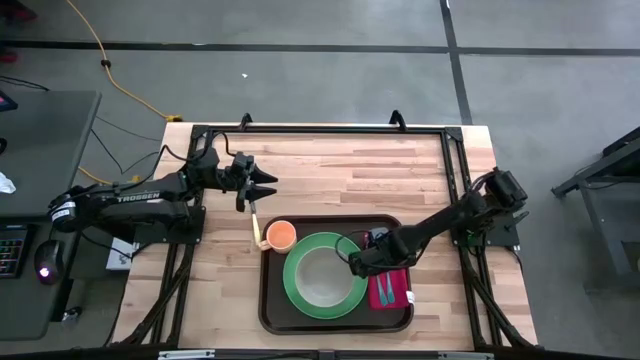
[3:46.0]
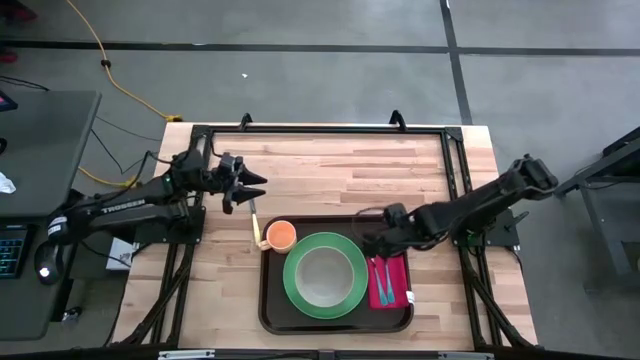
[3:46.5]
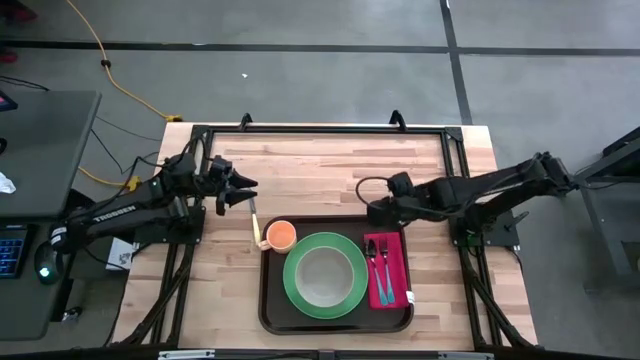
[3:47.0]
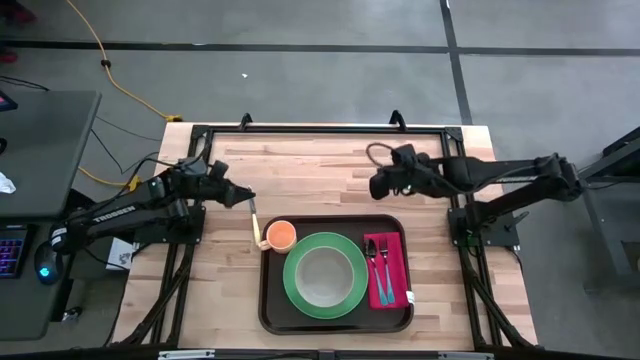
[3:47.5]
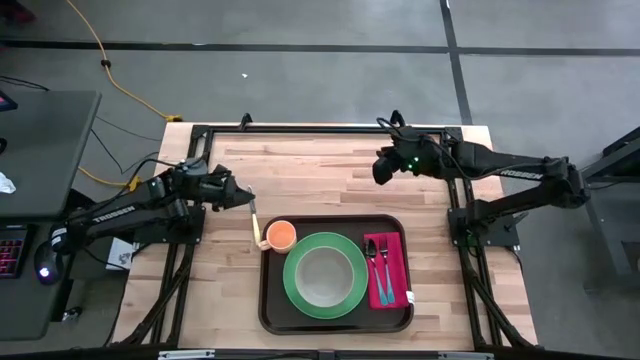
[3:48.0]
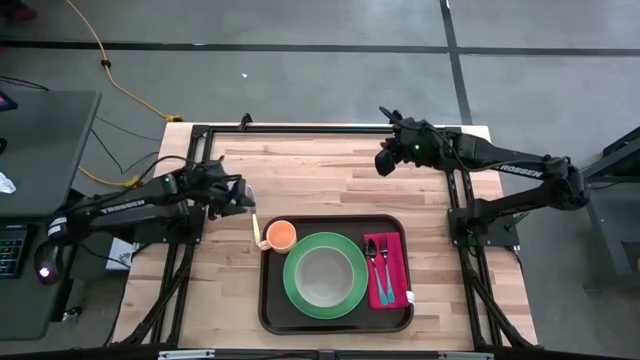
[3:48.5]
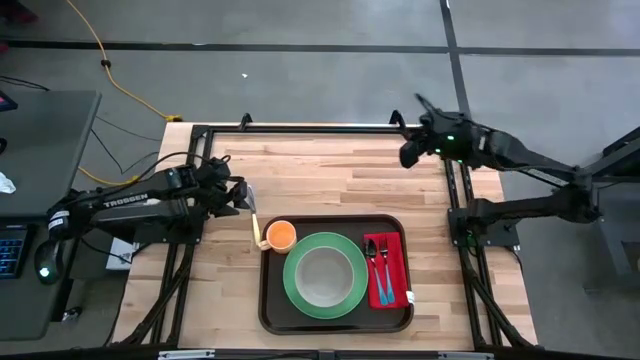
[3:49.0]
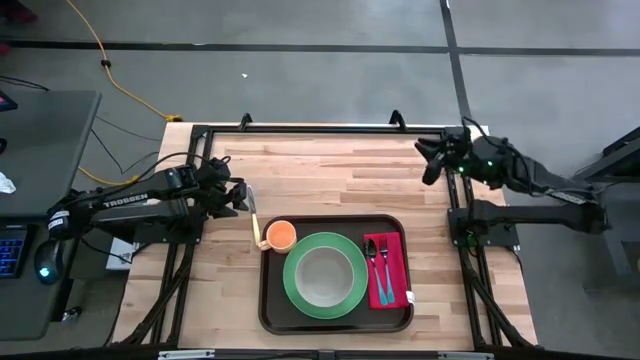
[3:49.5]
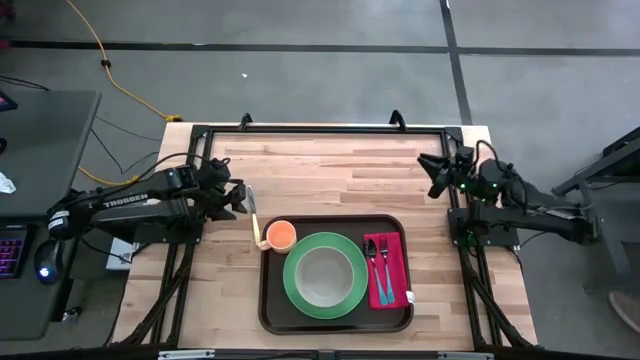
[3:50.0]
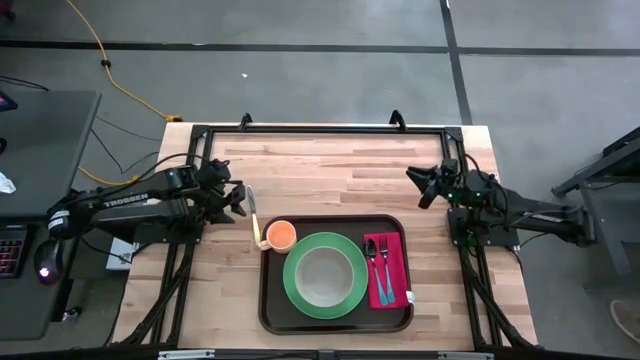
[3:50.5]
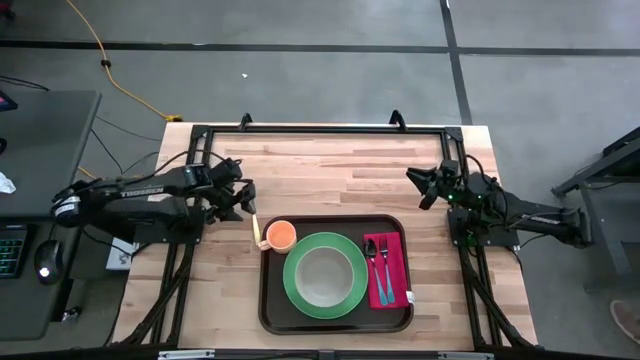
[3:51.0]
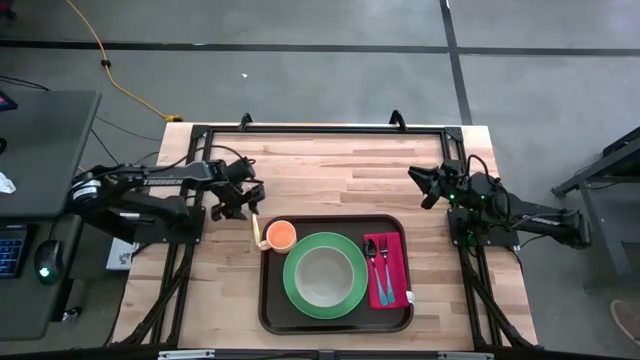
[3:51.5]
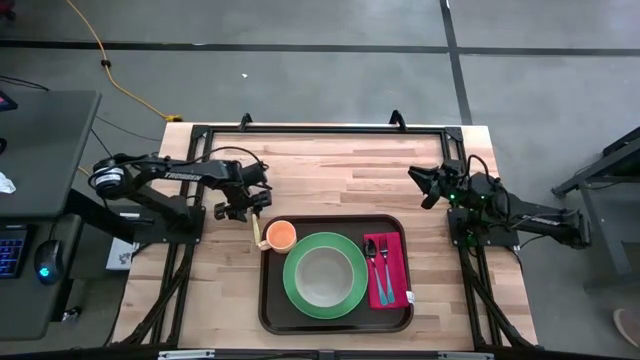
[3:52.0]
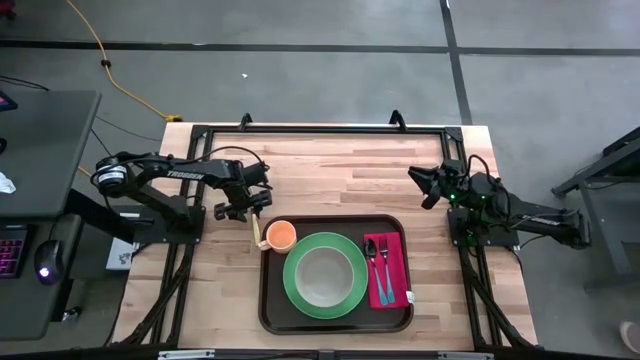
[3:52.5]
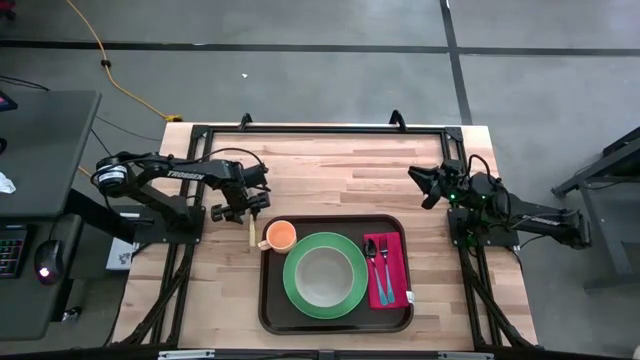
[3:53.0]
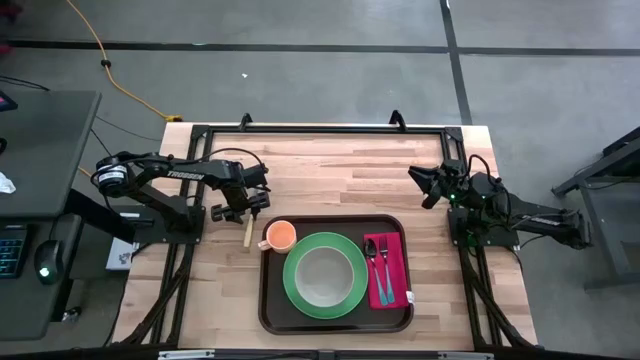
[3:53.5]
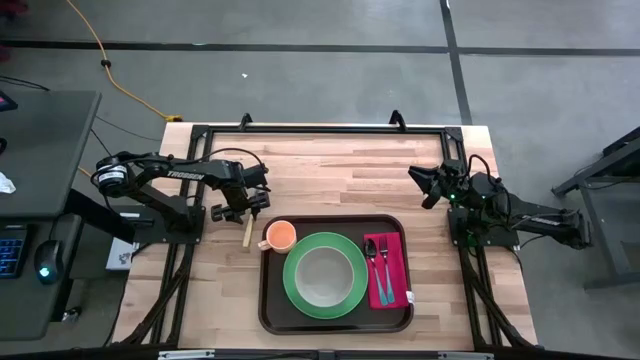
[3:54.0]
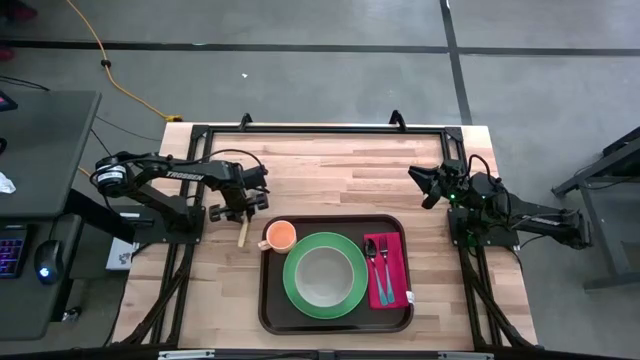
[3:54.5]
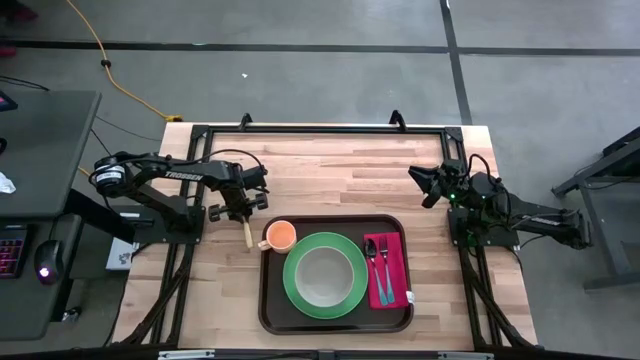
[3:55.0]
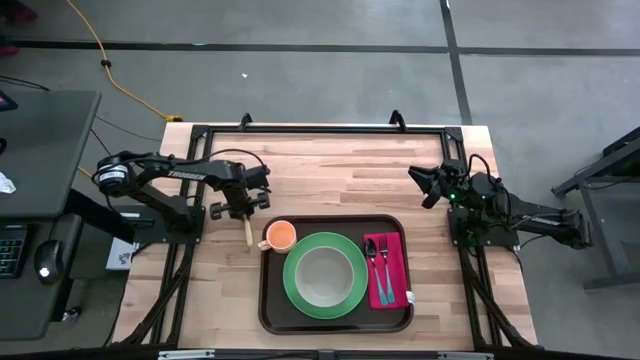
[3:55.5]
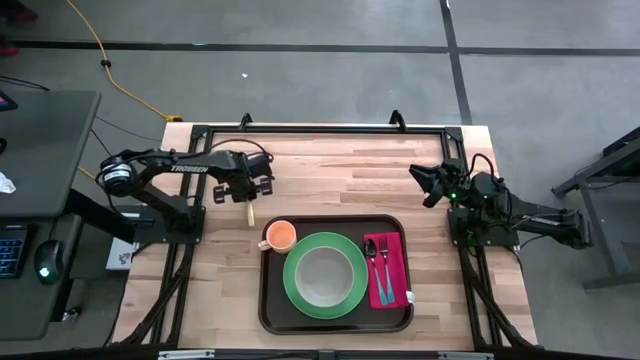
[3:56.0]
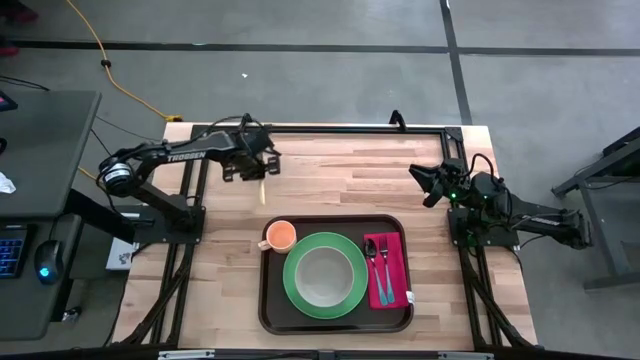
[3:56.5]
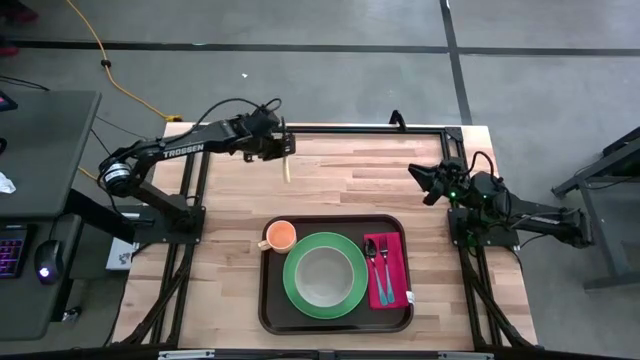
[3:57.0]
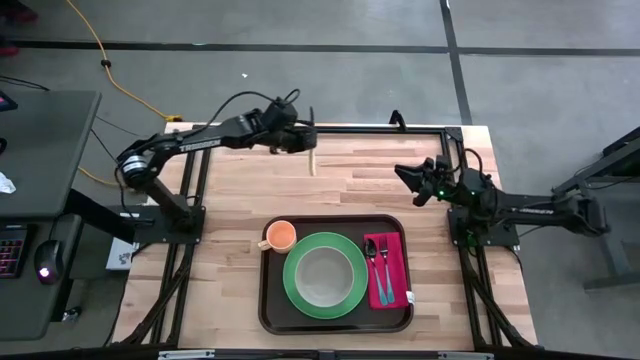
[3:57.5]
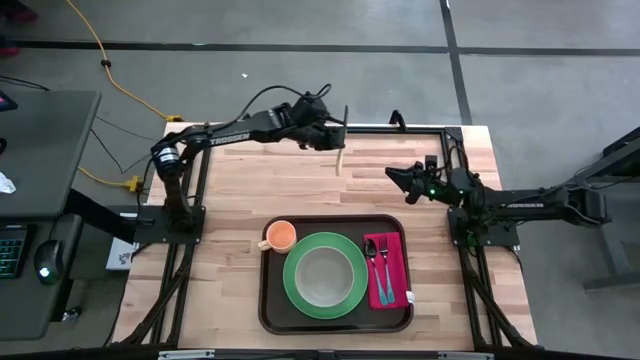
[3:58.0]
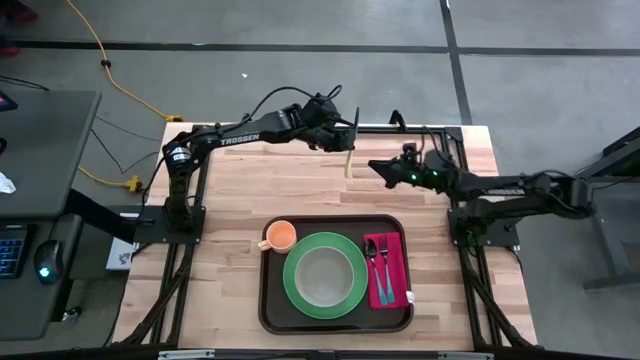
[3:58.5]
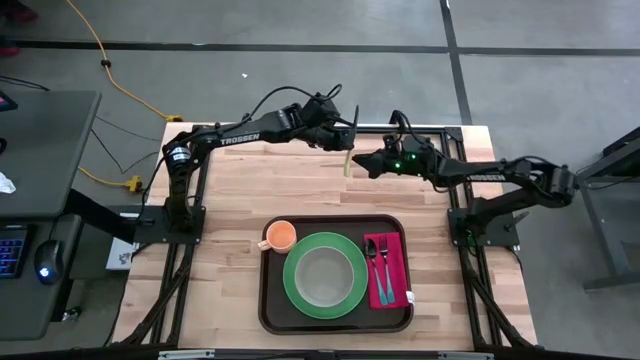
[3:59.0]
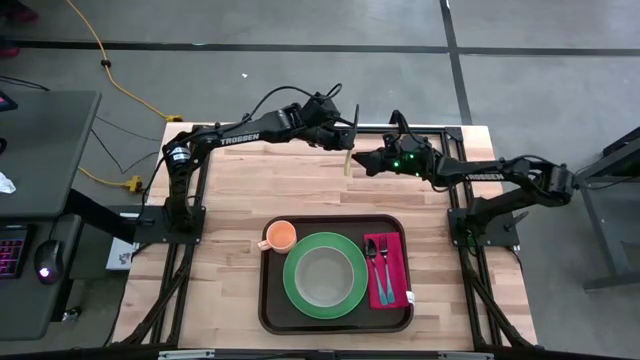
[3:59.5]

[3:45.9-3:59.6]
Task: Set up tray
Put the yellow table knife on top of the red napkin to the right of the blue fork on the black tray

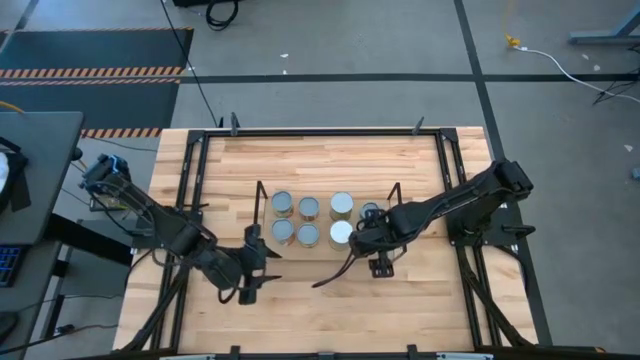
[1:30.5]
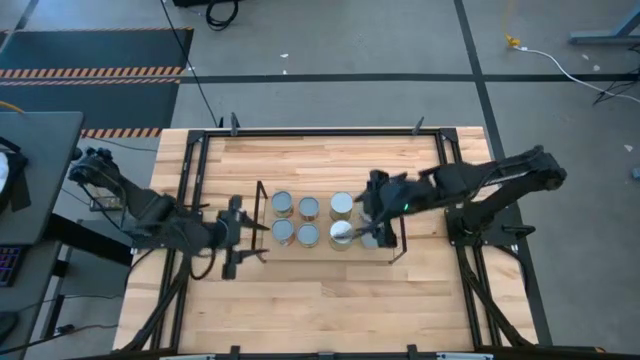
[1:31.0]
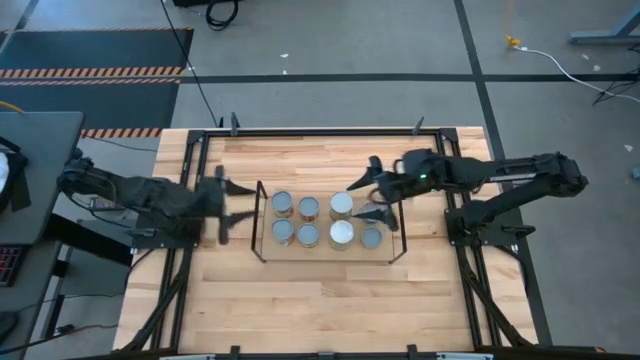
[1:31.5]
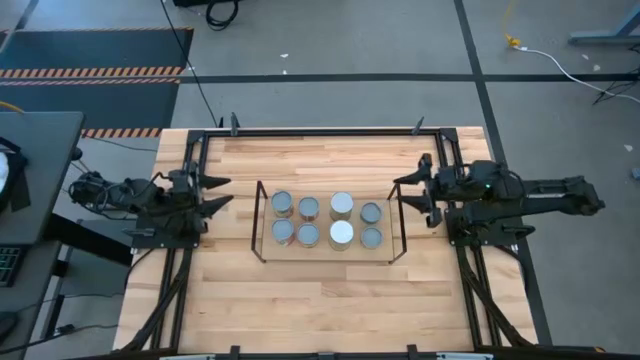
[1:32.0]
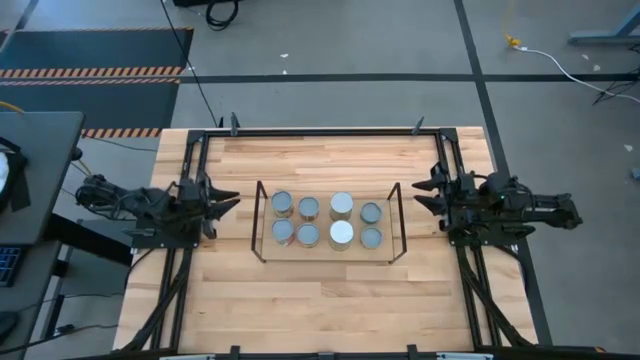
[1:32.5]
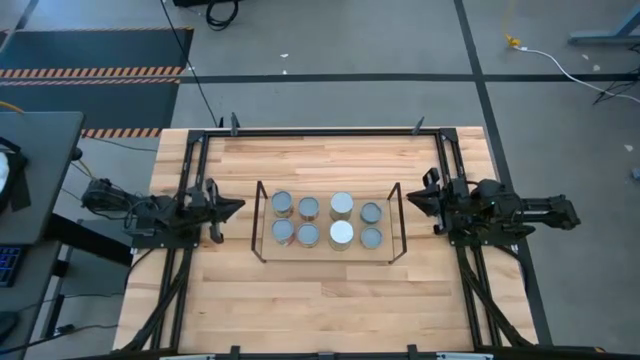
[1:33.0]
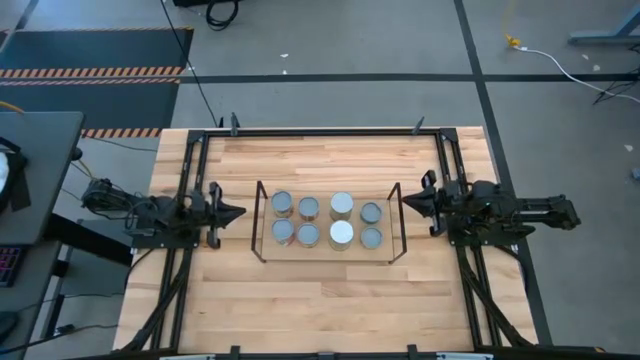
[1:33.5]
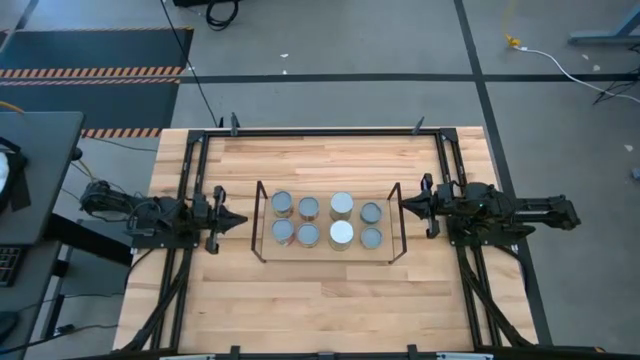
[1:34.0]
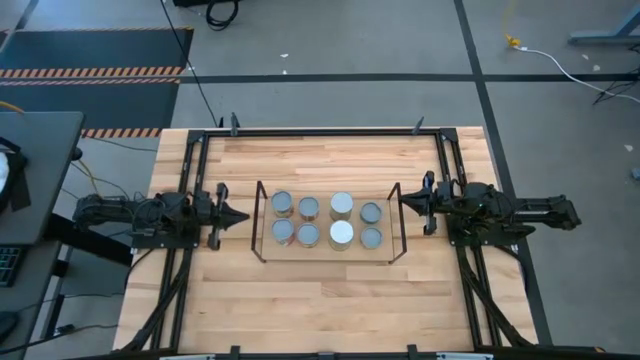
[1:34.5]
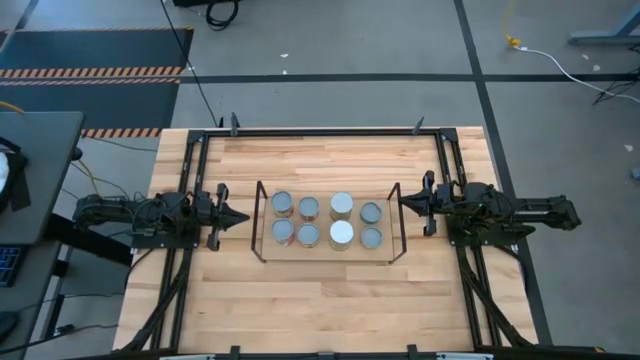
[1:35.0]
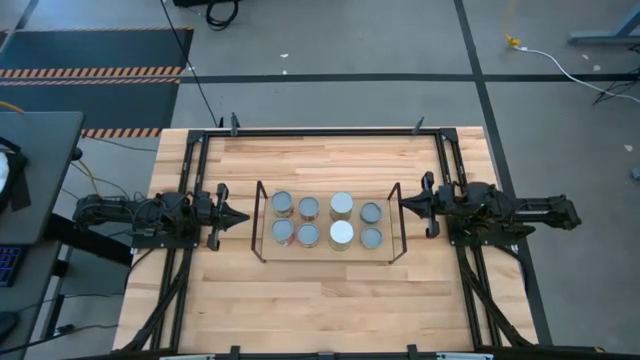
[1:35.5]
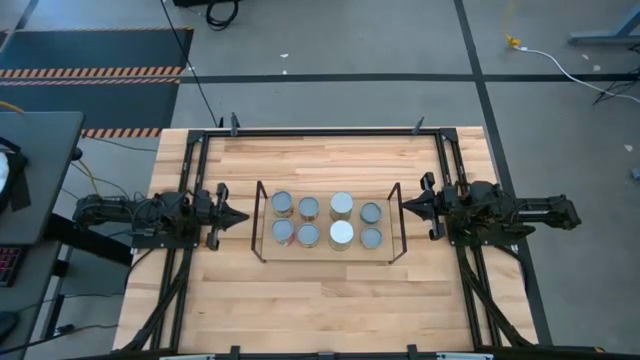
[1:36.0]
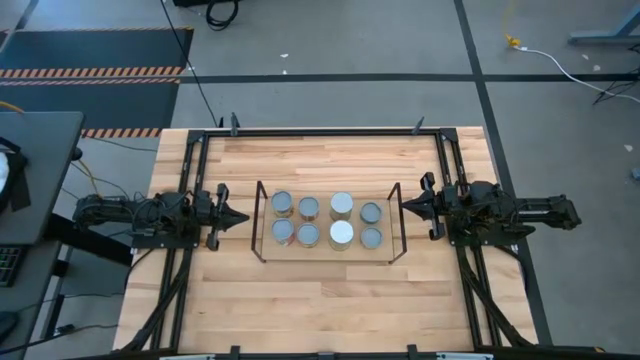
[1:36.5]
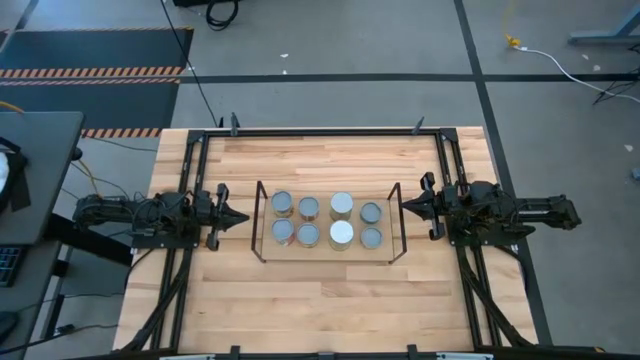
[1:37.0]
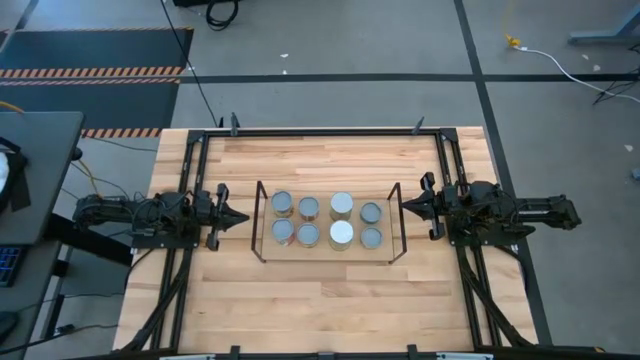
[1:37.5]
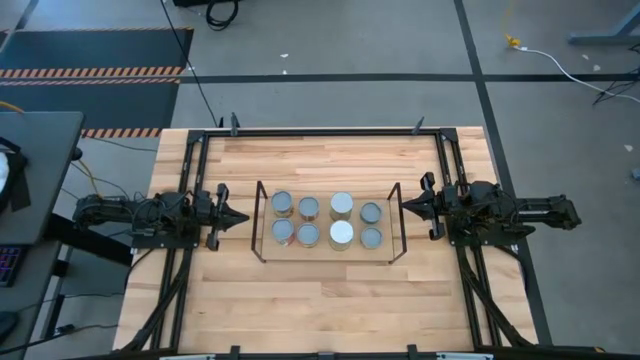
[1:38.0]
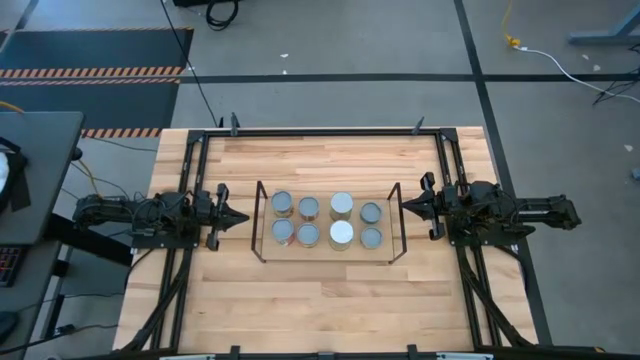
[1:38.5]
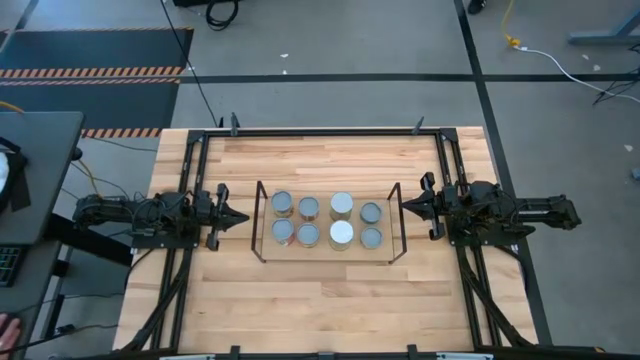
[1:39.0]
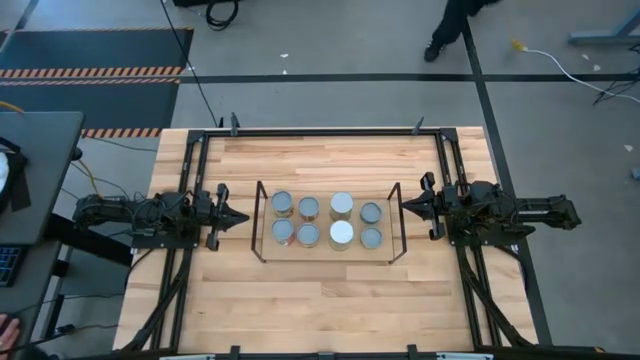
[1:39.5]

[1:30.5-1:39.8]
Task: Pick and place cans onto a shelf
Return to Home Position
